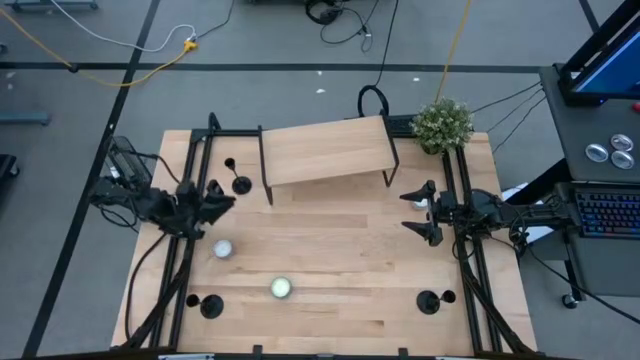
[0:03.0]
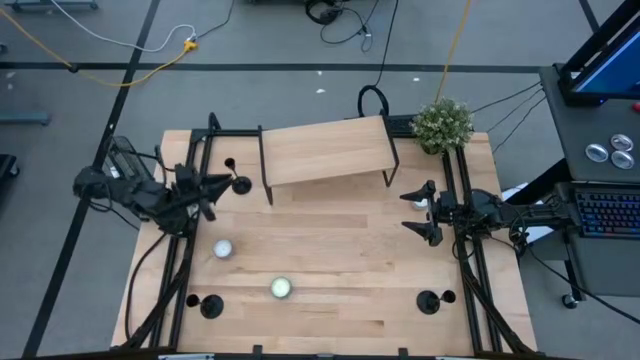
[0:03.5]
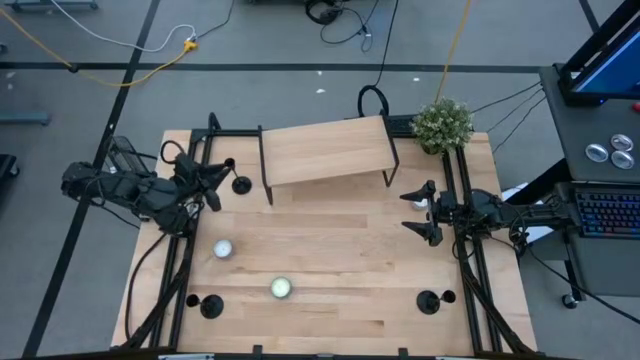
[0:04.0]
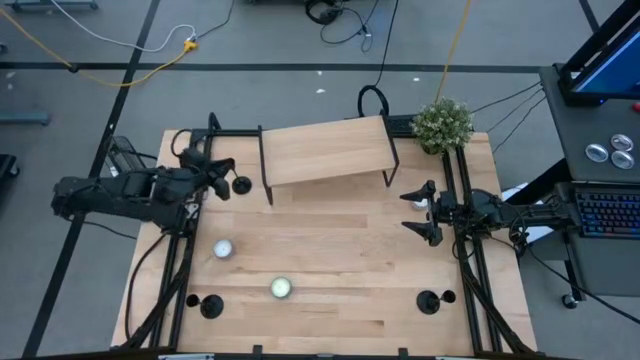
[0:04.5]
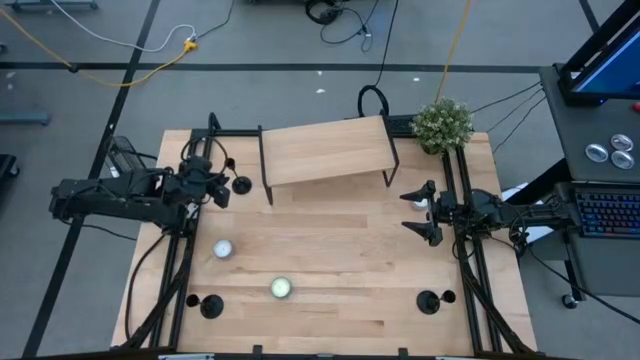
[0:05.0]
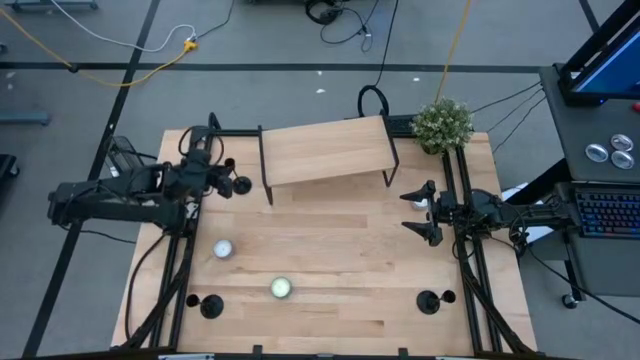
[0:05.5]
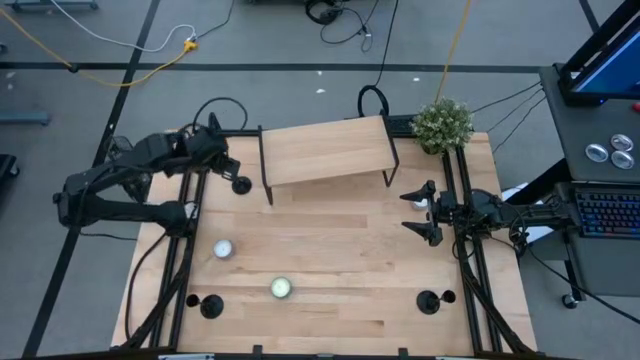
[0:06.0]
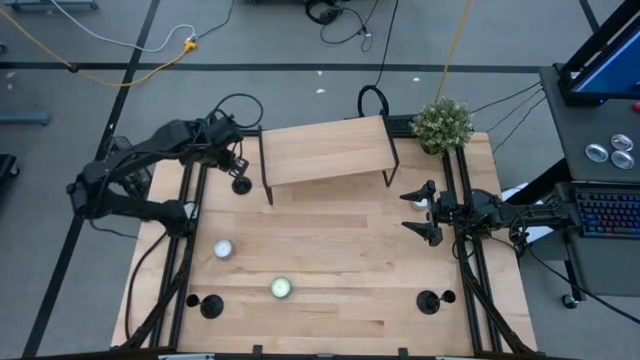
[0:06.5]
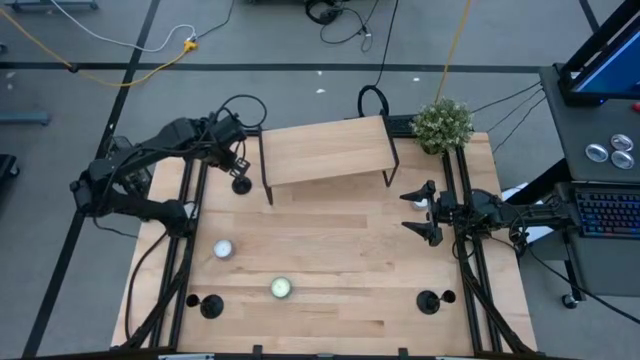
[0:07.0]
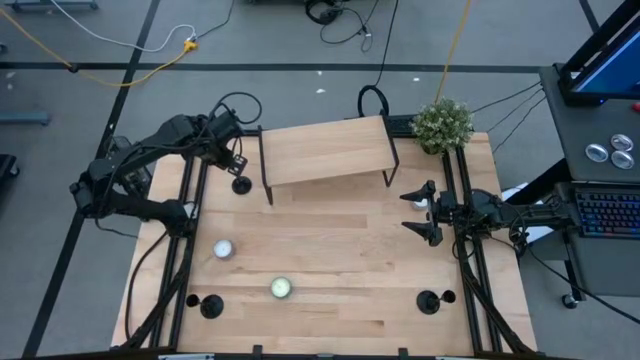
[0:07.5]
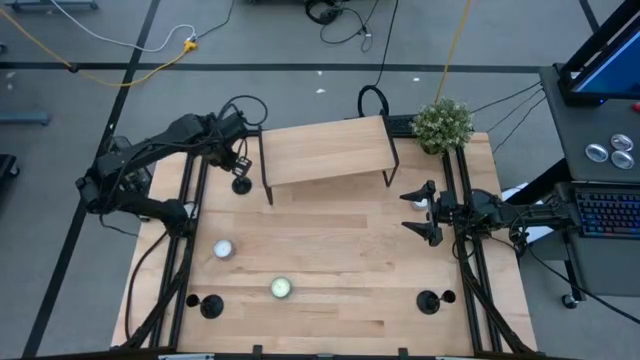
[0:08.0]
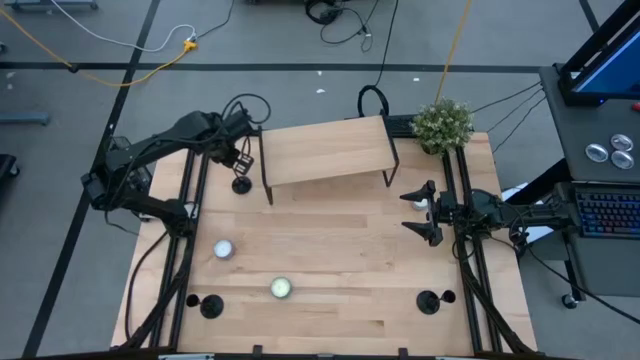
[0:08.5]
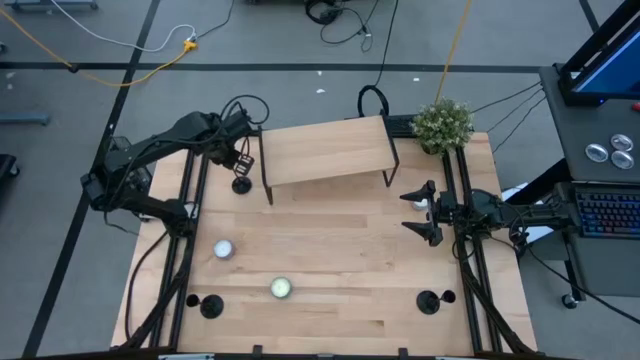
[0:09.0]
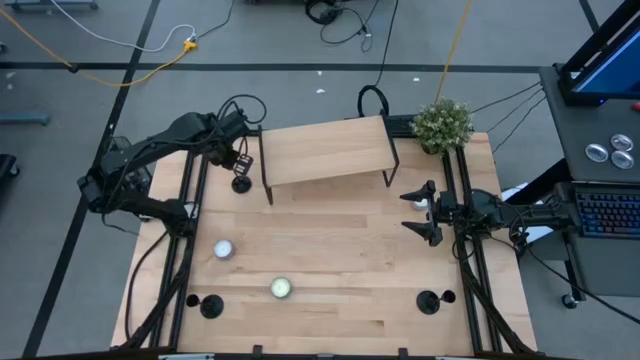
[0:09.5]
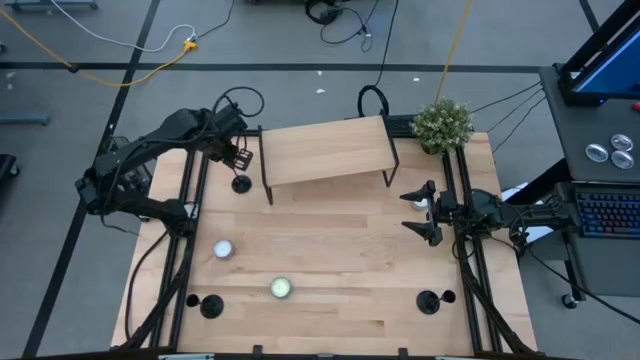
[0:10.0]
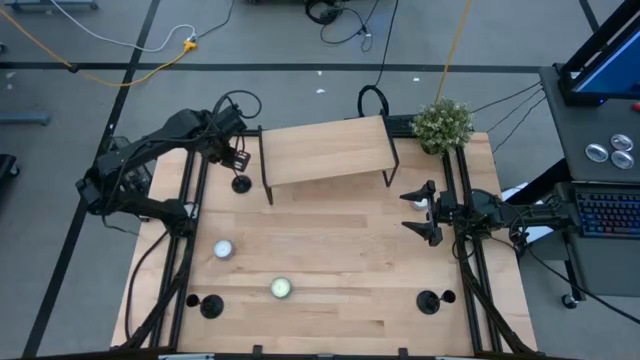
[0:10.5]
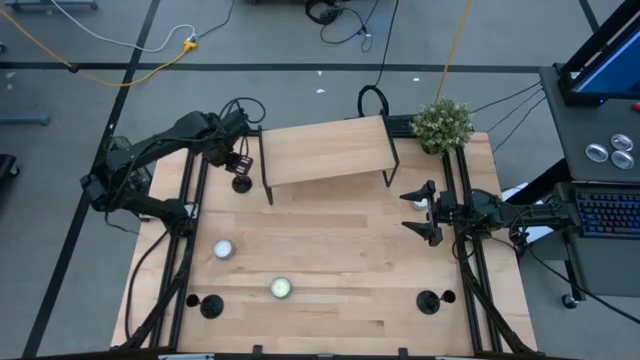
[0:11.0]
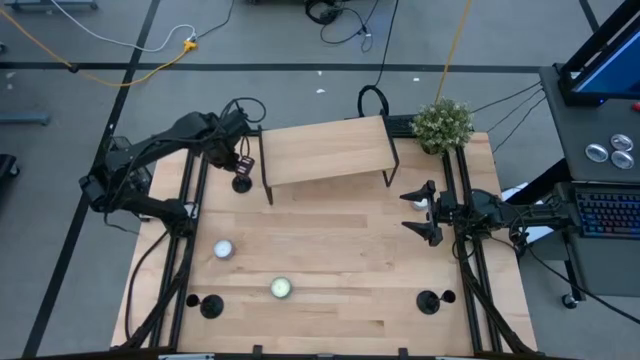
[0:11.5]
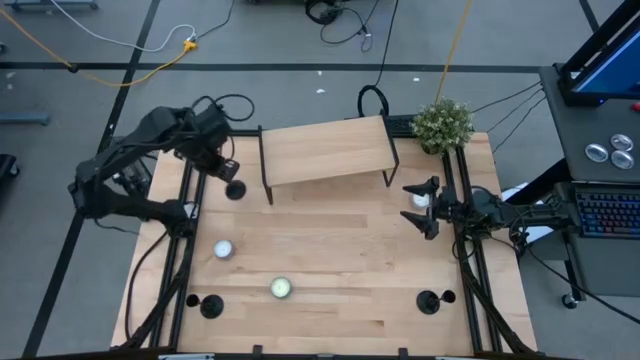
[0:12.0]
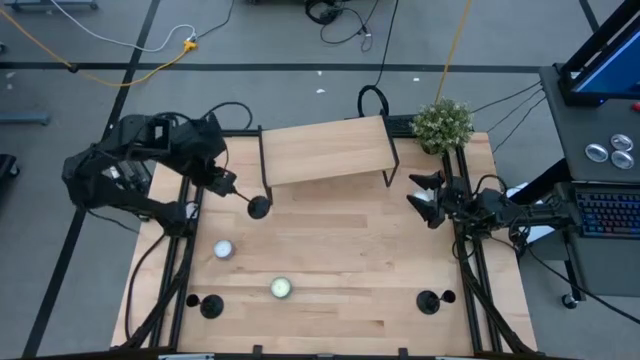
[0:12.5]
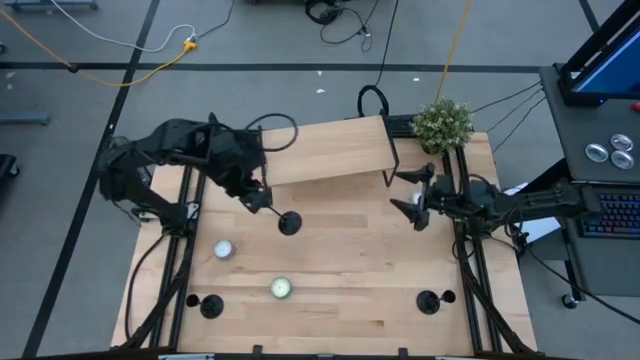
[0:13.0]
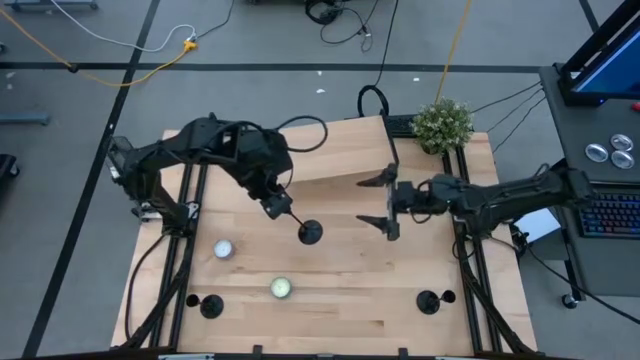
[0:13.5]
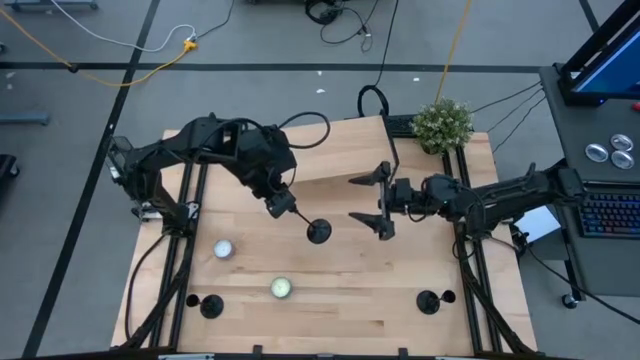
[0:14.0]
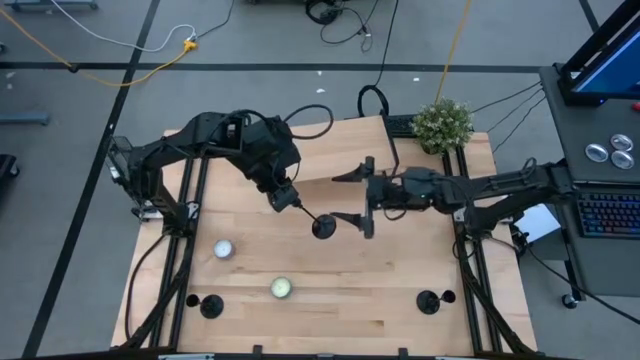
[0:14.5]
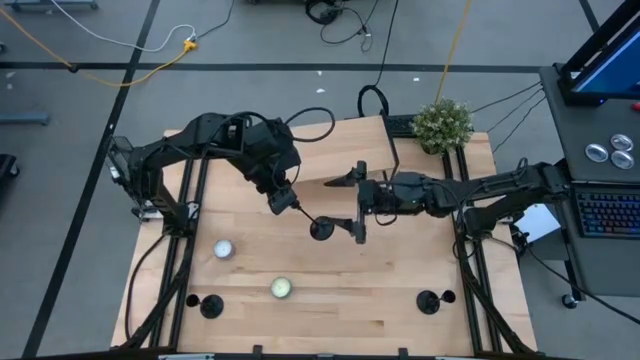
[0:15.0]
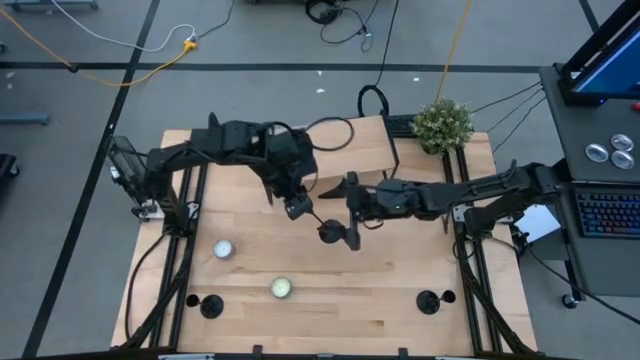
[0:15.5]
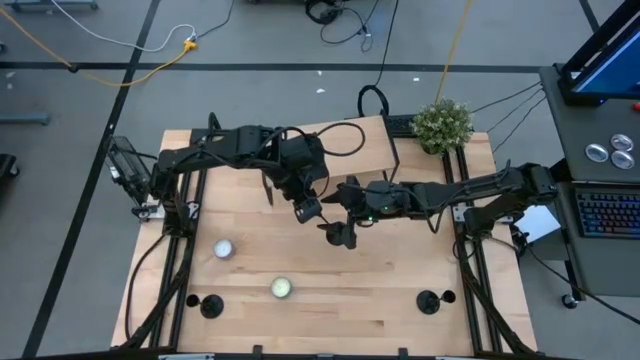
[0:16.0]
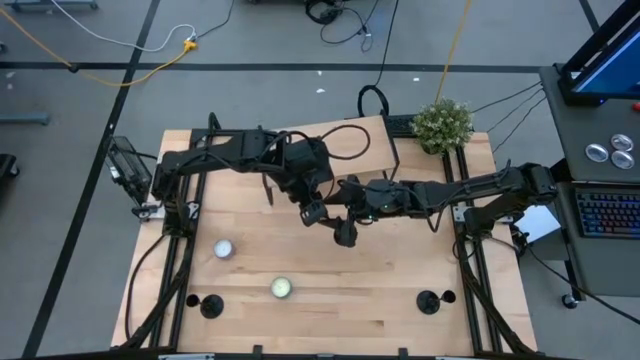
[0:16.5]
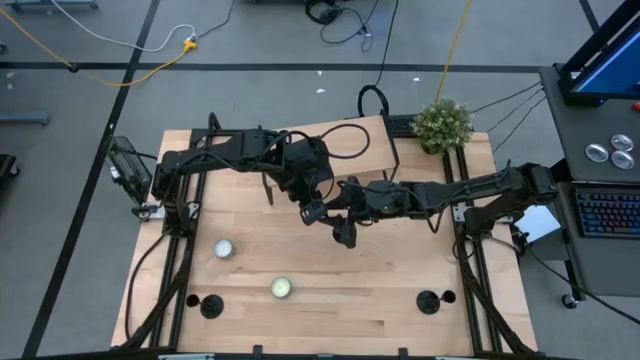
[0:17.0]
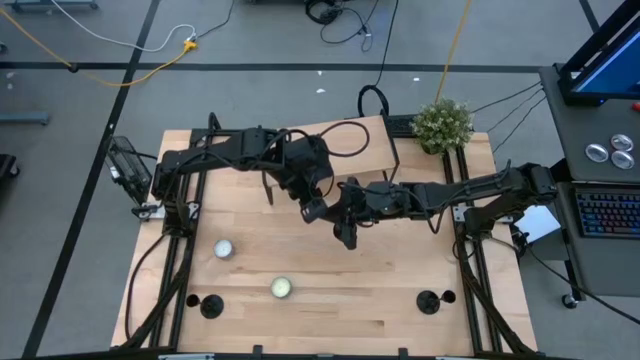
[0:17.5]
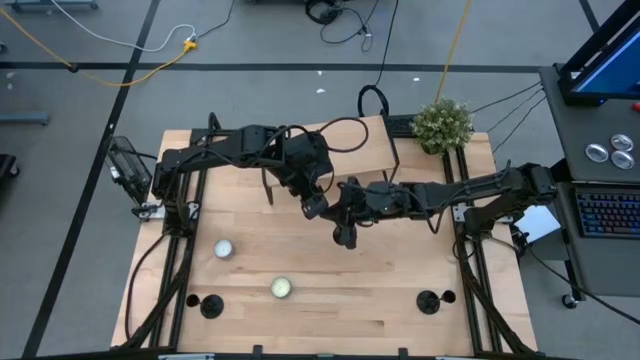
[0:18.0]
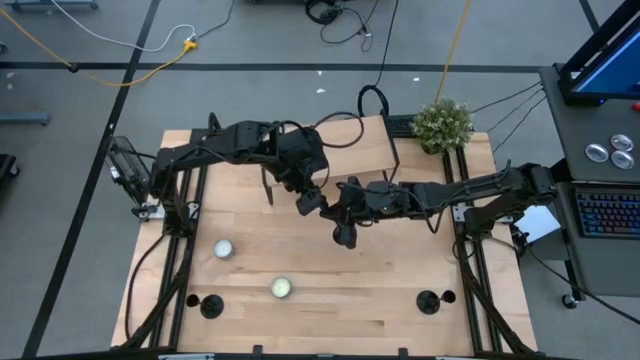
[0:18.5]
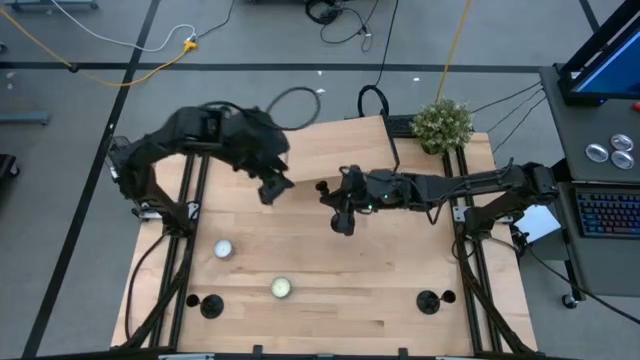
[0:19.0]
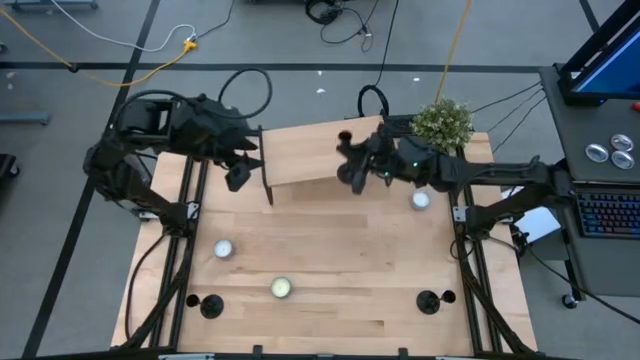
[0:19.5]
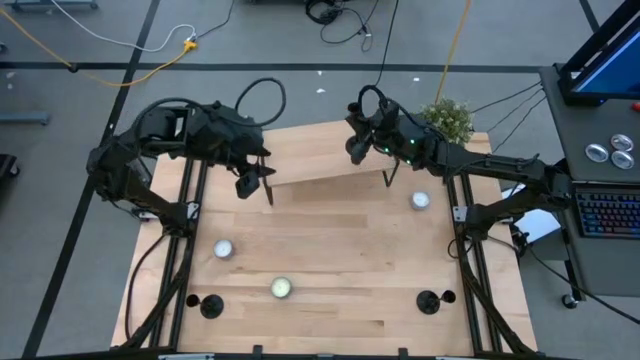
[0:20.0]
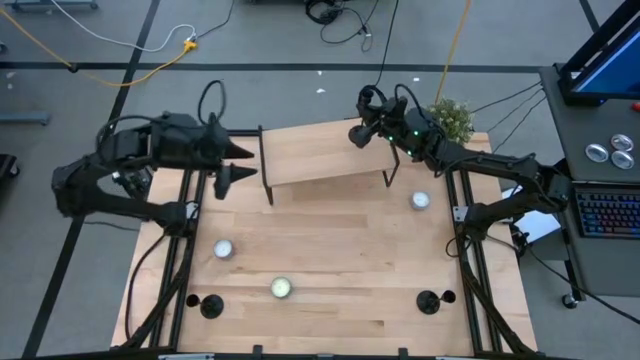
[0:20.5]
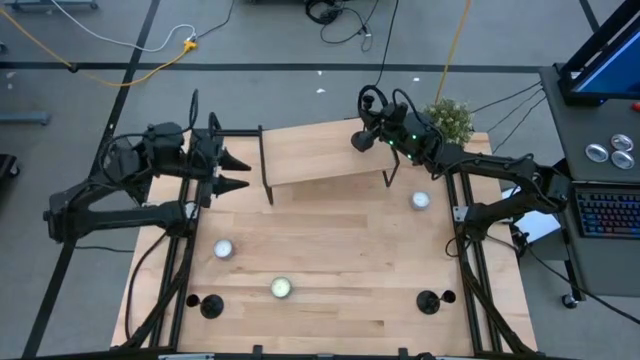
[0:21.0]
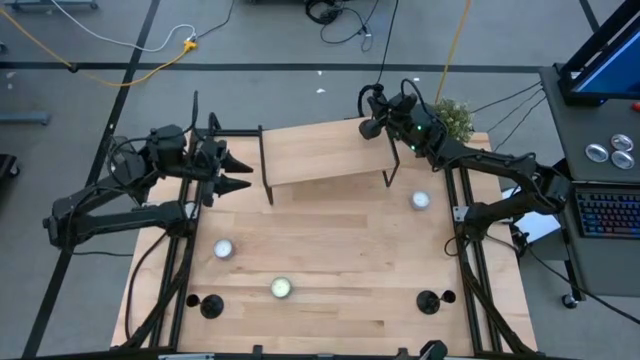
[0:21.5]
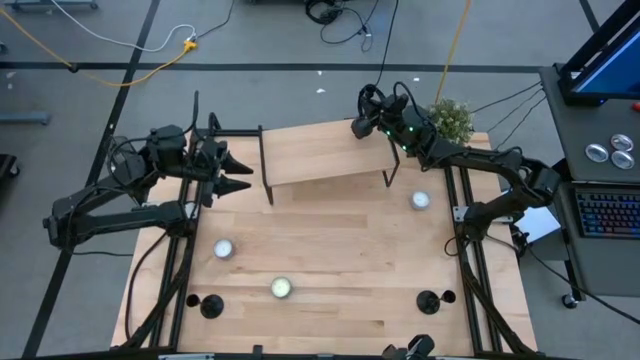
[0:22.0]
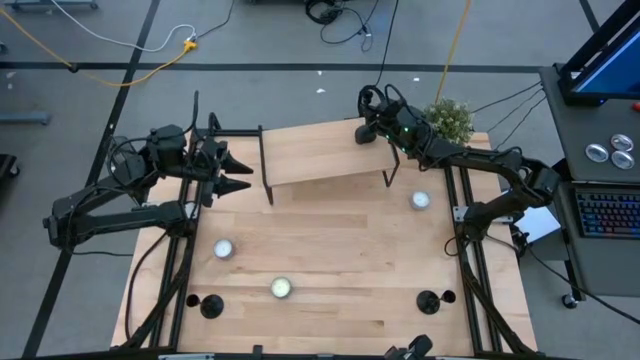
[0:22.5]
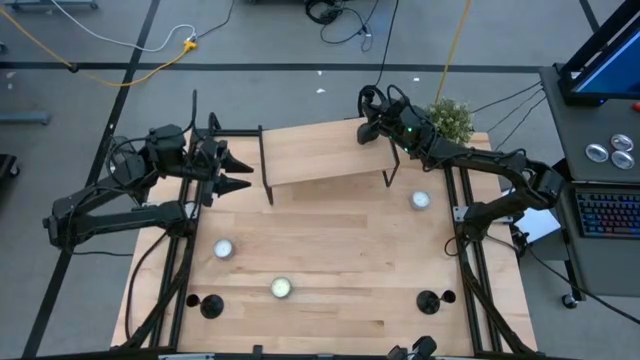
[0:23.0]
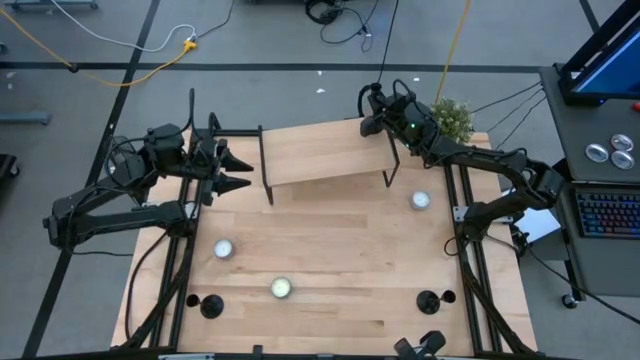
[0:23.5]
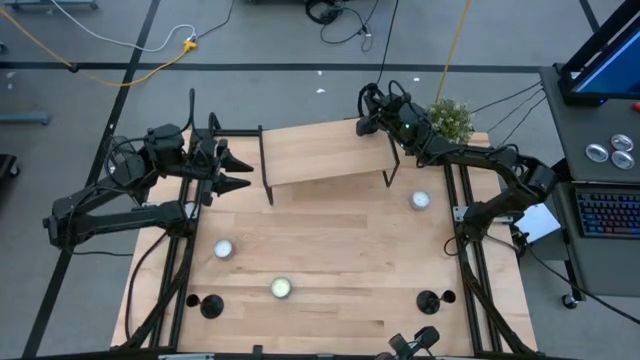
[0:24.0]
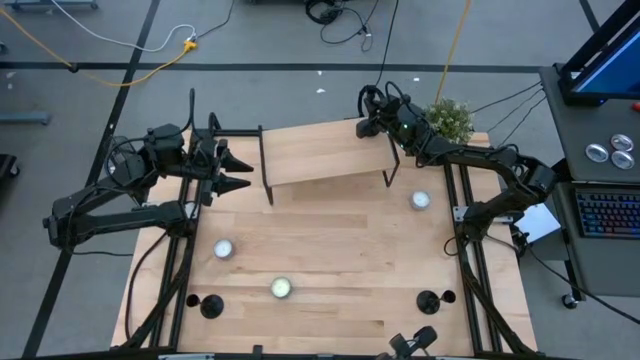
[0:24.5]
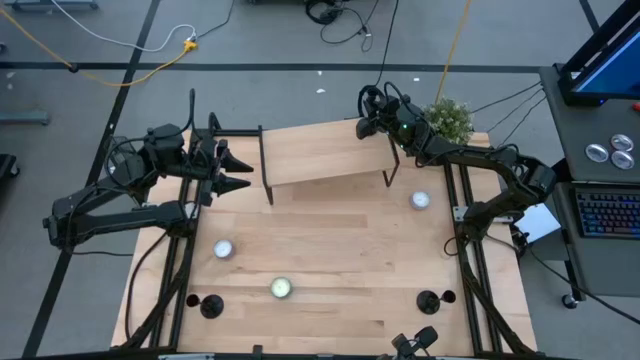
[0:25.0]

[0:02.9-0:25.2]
Task: Pick & Place candle stick holders
Put the top black candle holder on the shelf
